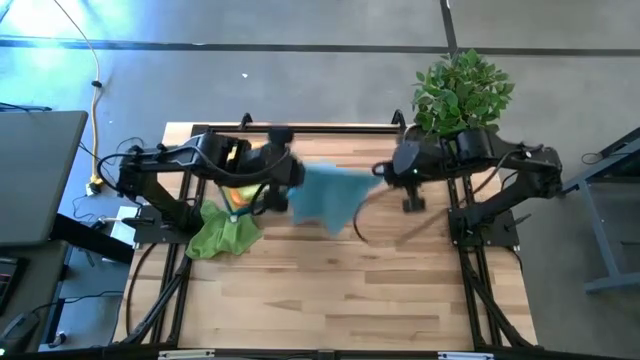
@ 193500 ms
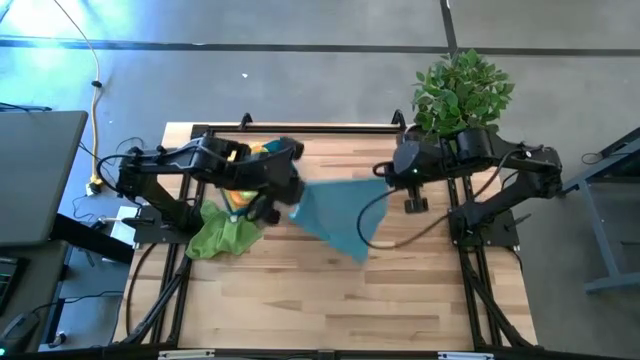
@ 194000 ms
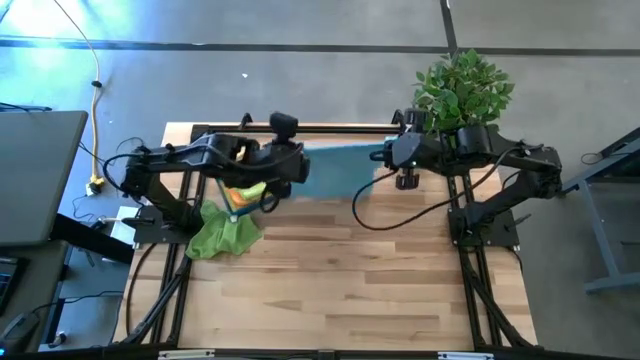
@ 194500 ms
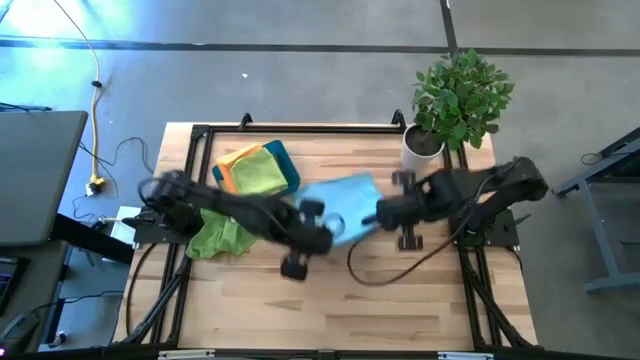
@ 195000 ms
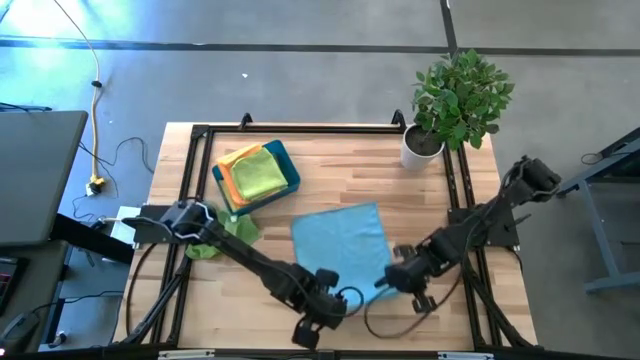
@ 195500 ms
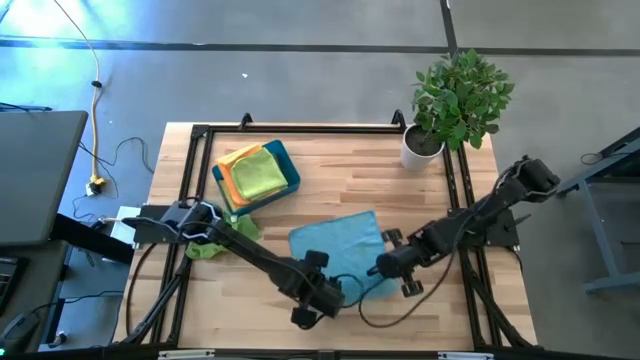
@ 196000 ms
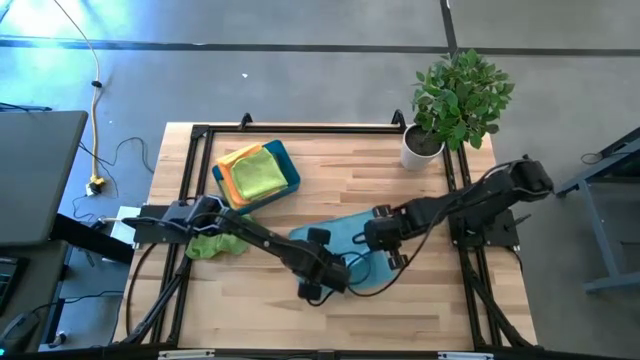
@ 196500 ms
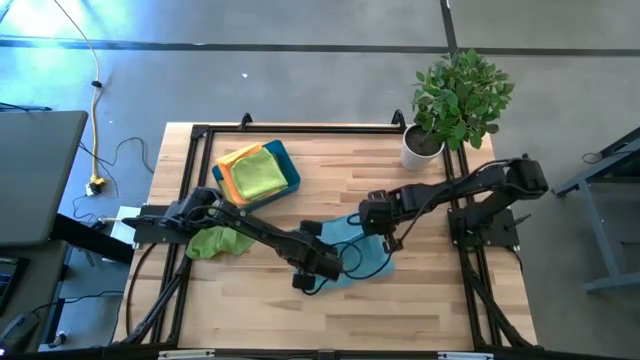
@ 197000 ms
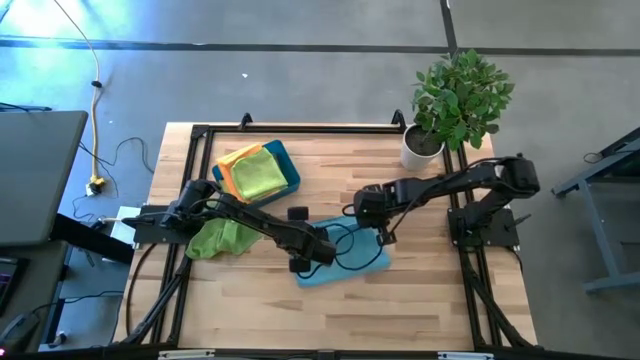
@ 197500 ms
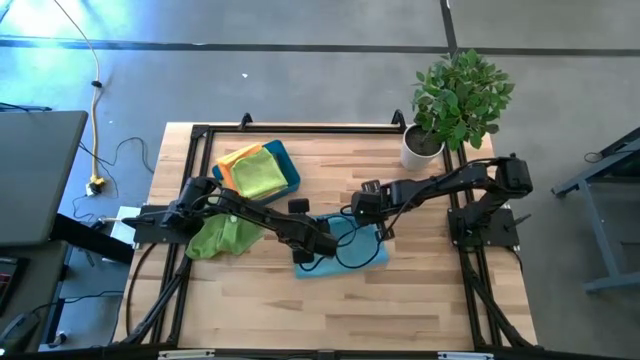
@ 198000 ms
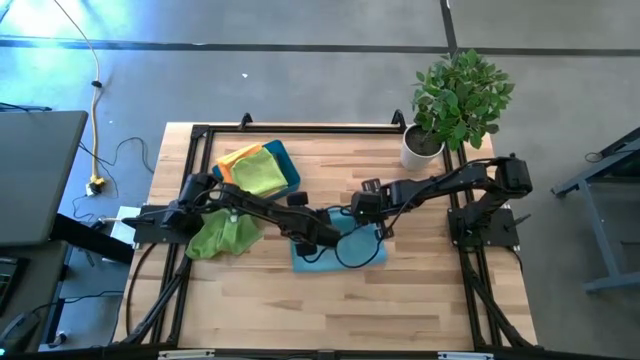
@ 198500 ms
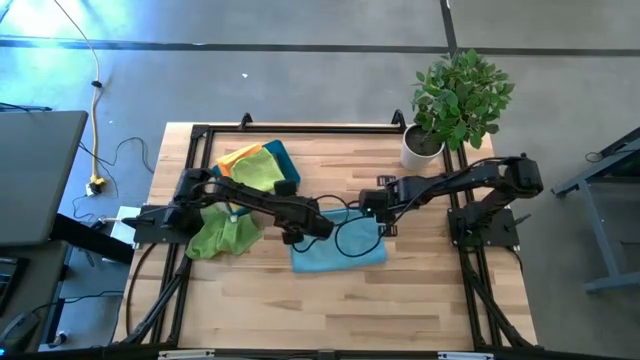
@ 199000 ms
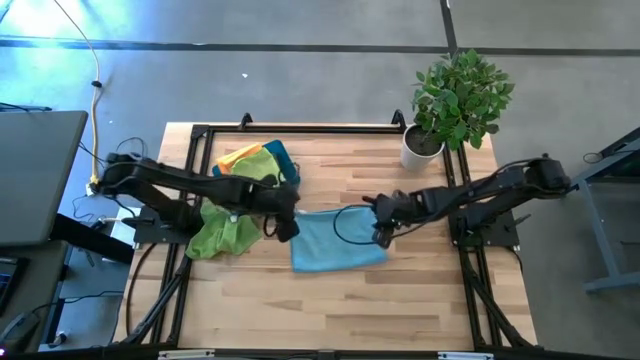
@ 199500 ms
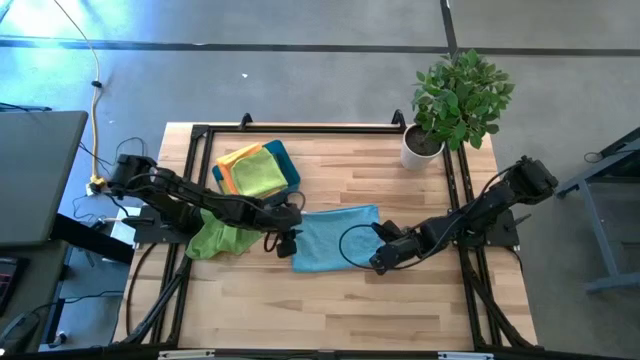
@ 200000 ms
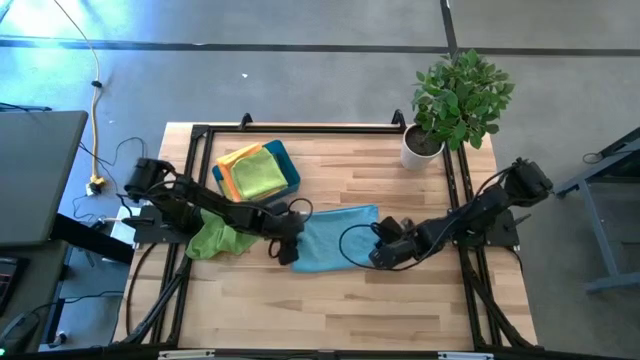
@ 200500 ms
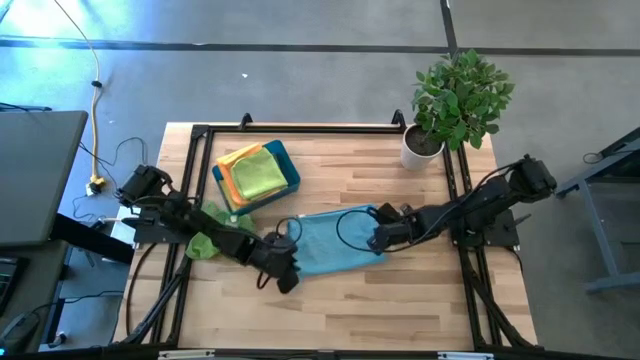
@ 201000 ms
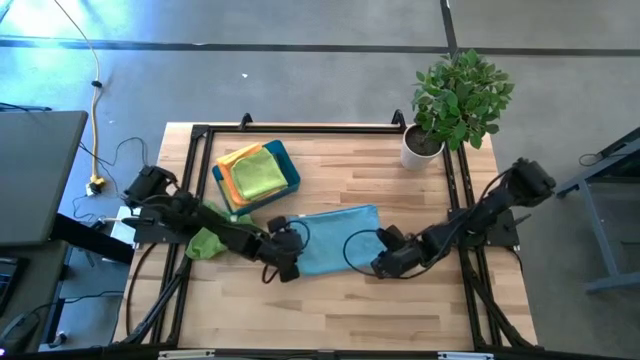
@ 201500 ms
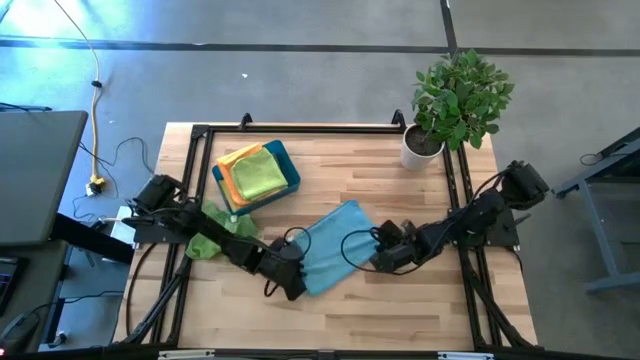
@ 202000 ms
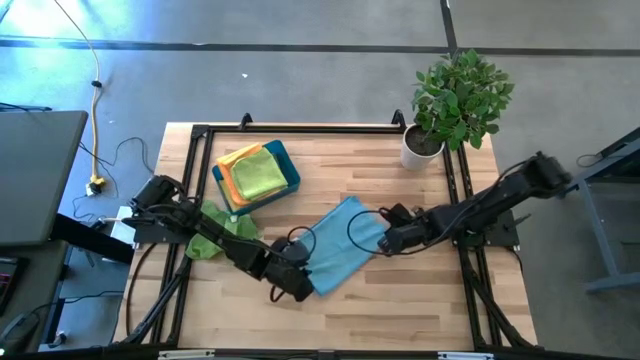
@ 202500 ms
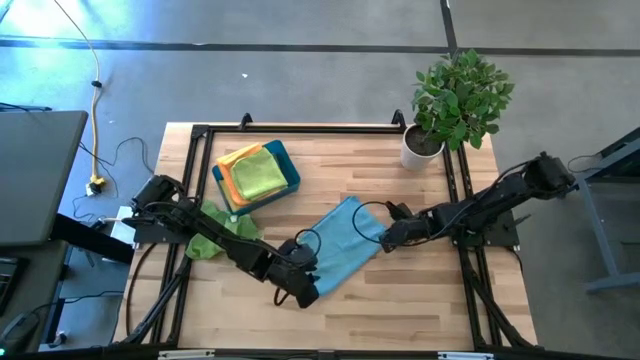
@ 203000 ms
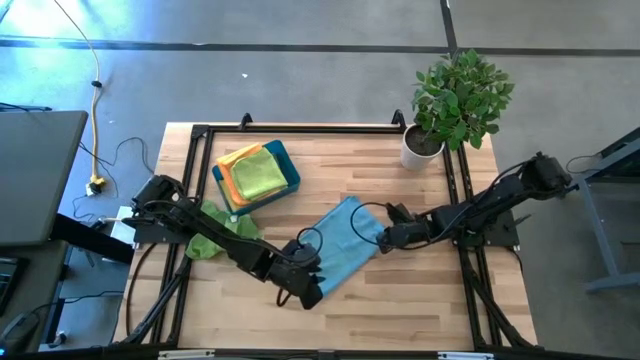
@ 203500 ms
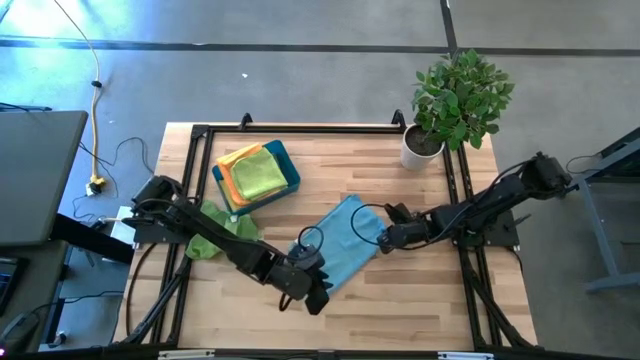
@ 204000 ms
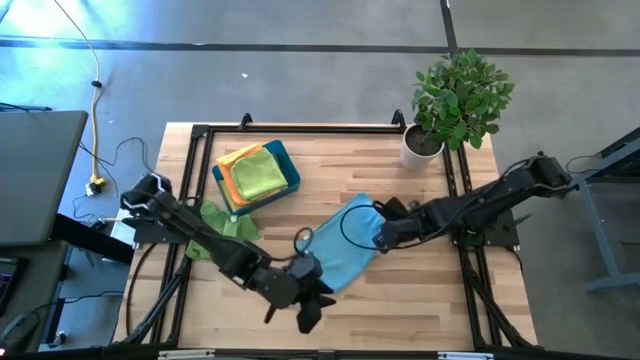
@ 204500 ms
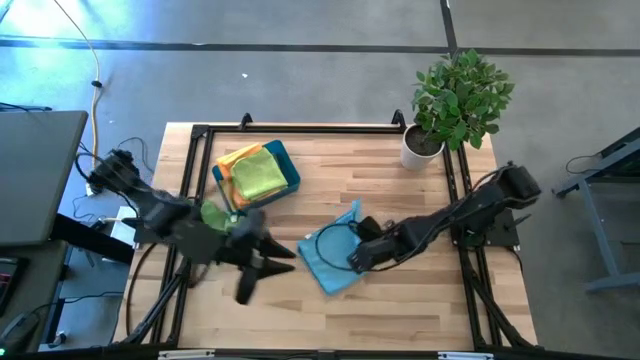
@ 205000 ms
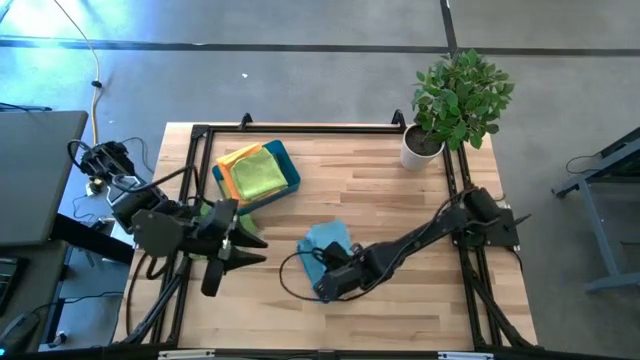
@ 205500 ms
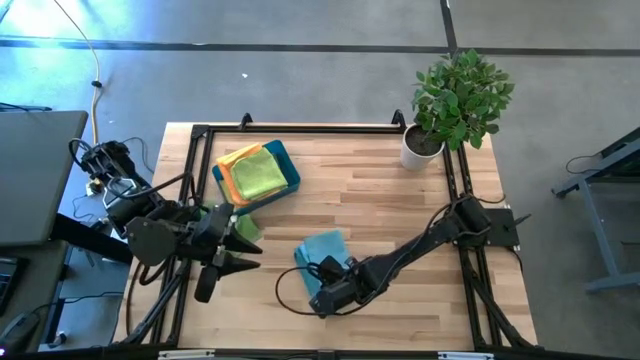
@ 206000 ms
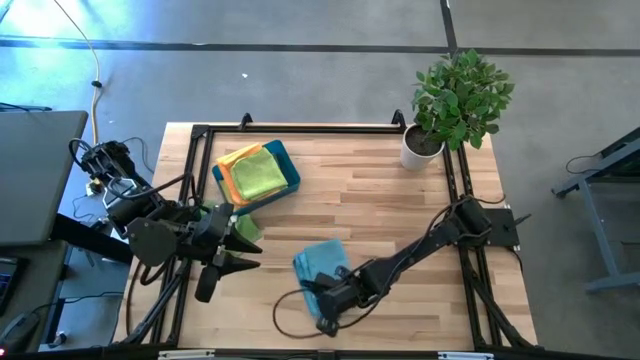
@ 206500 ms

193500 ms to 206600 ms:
Task: Fold microfiber towels
Fold the blue microfiber cloth

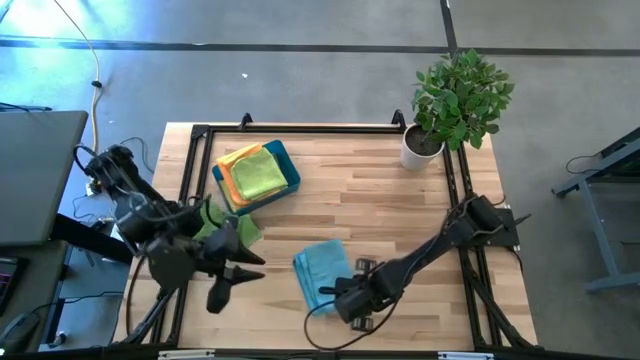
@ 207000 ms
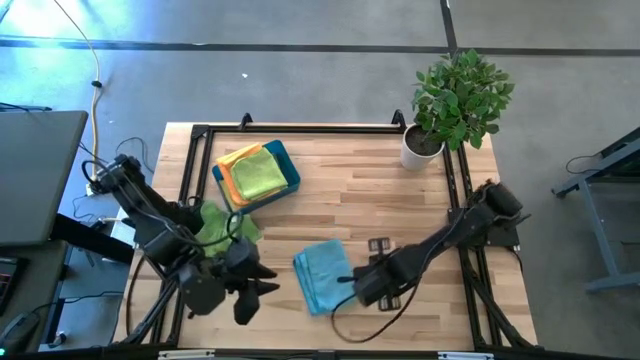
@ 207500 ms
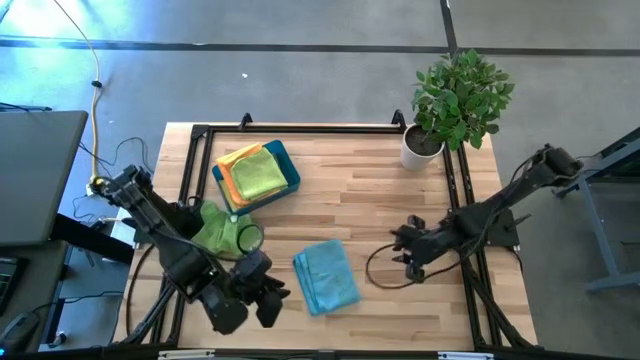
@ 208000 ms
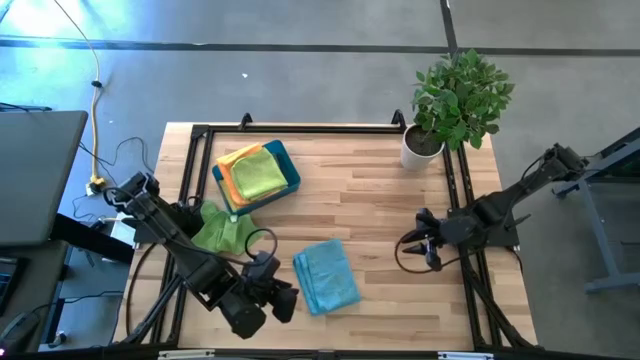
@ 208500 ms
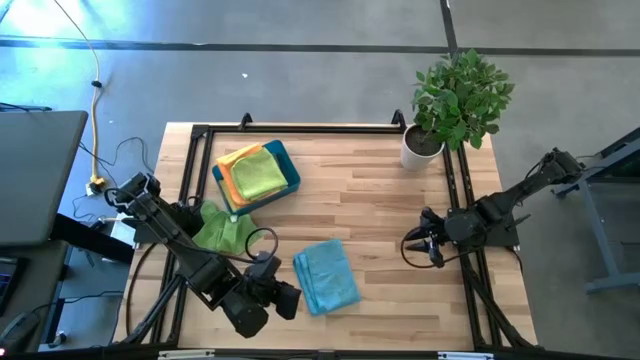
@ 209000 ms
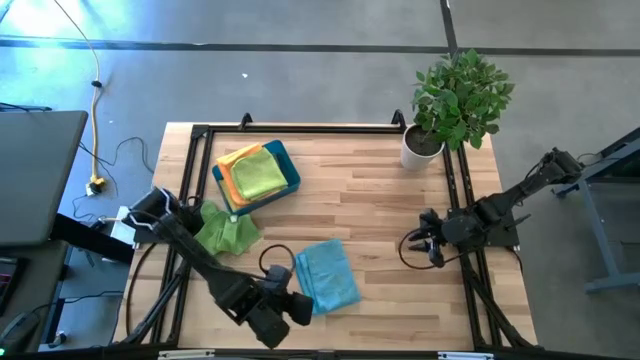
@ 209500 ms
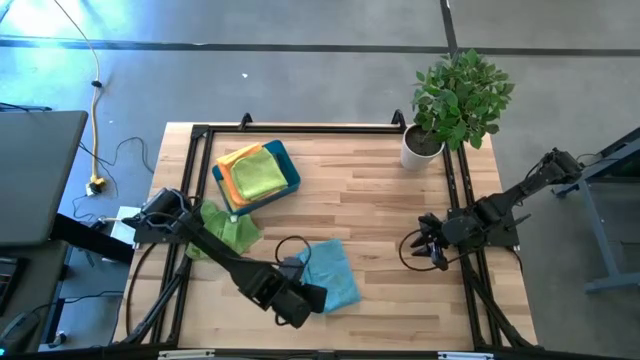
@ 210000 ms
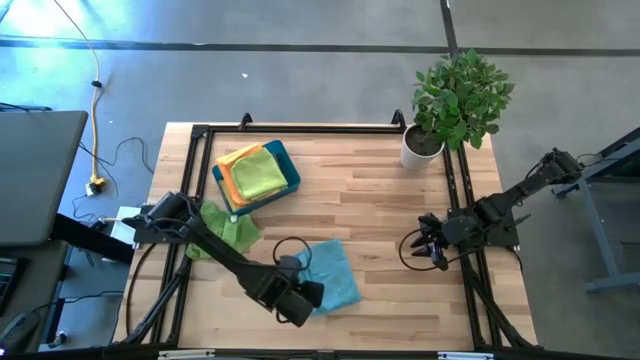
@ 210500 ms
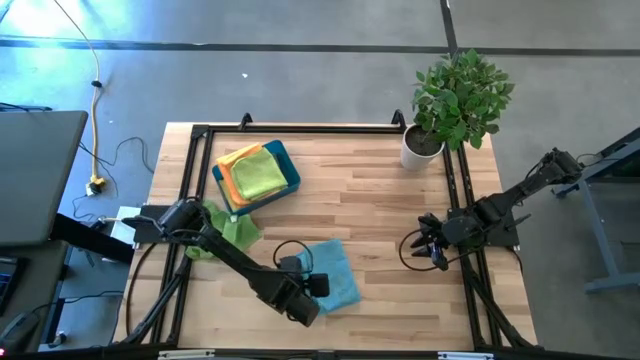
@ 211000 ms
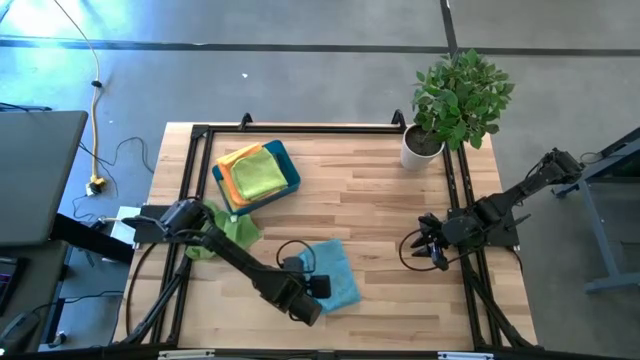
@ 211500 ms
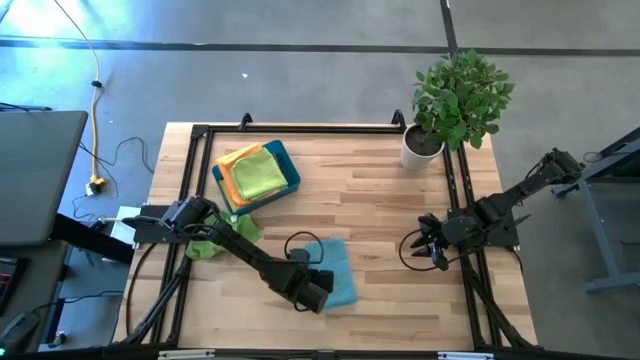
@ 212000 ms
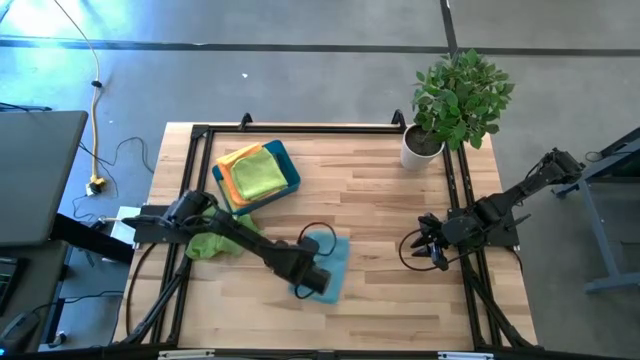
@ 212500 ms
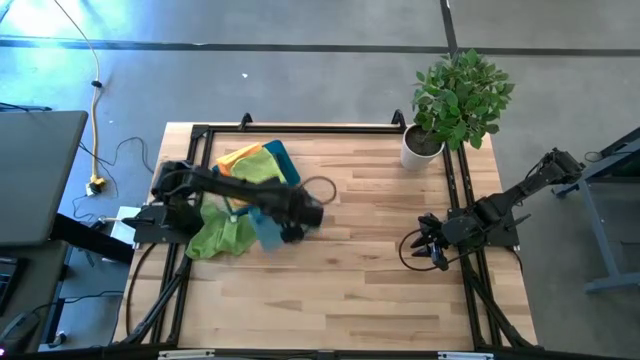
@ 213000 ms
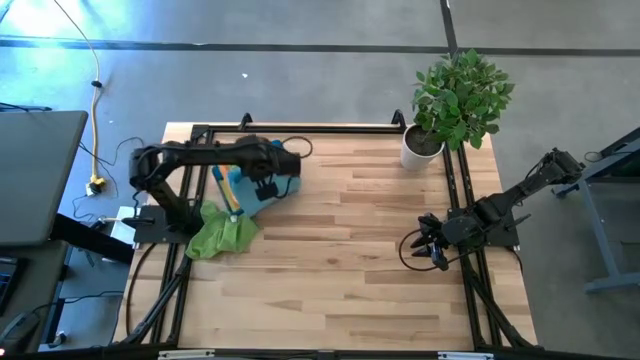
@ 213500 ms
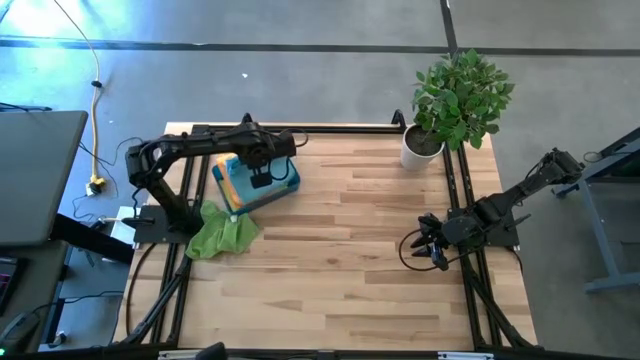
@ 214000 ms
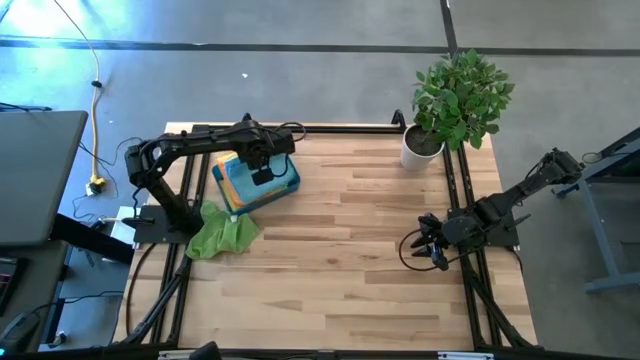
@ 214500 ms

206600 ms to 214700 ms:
Put the folded blue microfiber cloth into the bin
